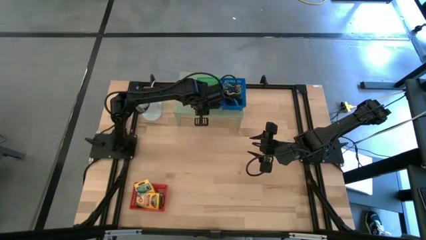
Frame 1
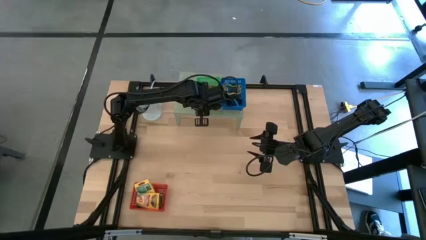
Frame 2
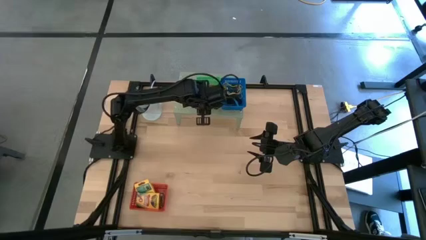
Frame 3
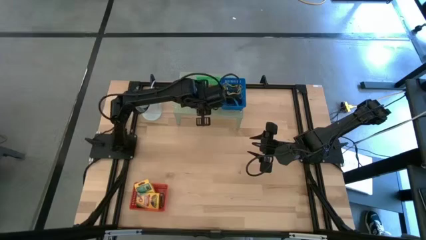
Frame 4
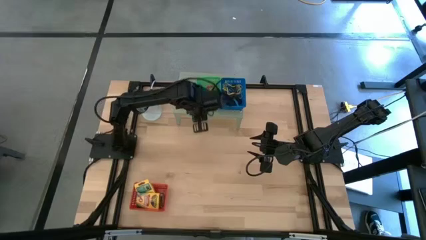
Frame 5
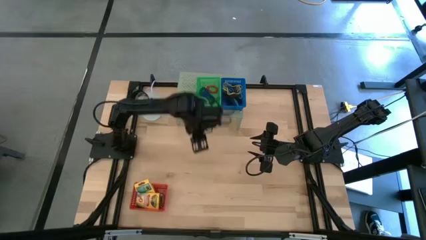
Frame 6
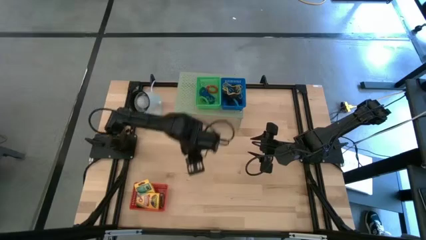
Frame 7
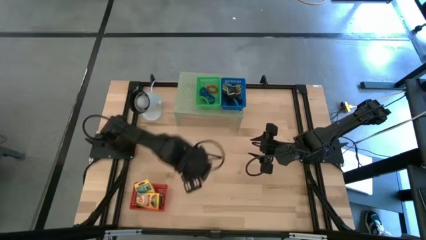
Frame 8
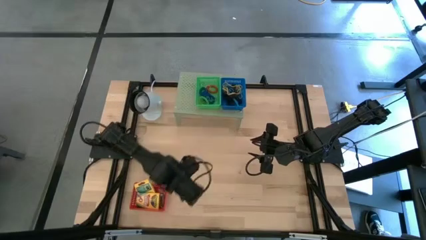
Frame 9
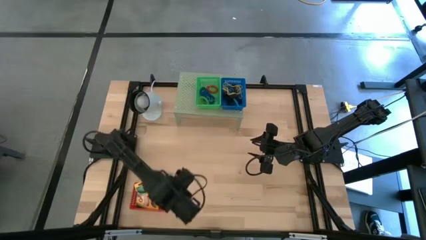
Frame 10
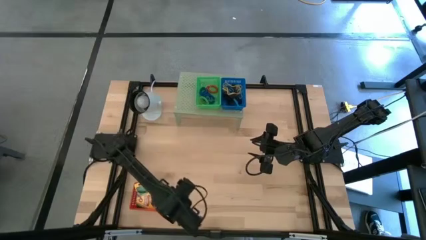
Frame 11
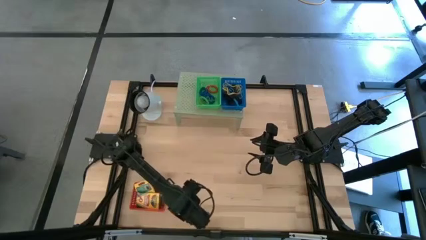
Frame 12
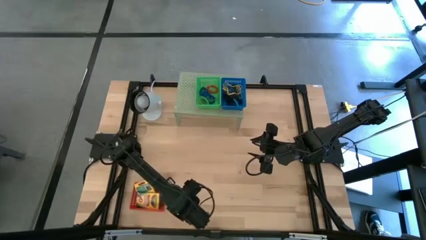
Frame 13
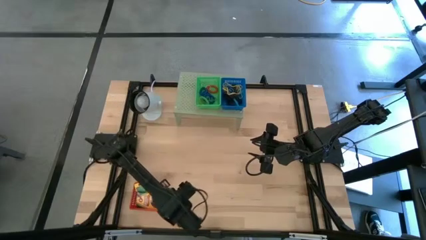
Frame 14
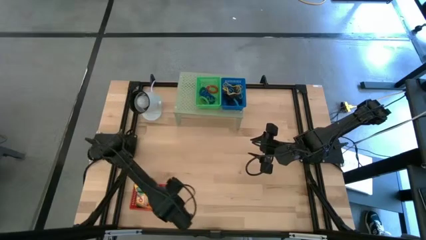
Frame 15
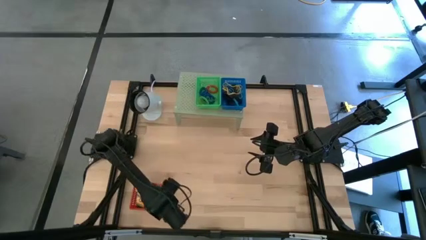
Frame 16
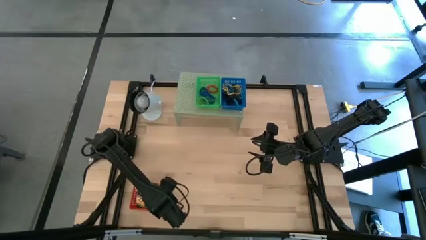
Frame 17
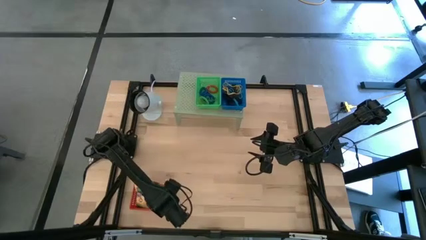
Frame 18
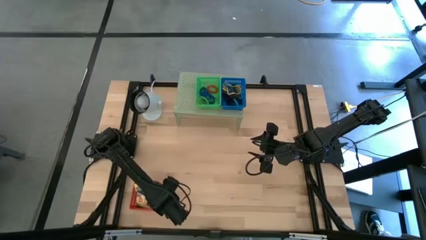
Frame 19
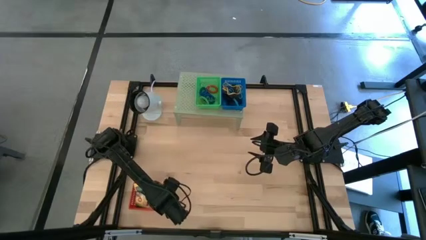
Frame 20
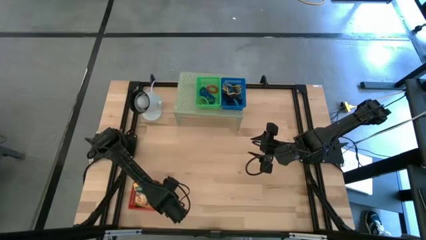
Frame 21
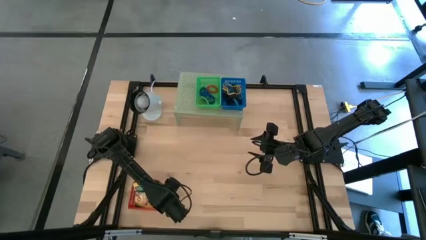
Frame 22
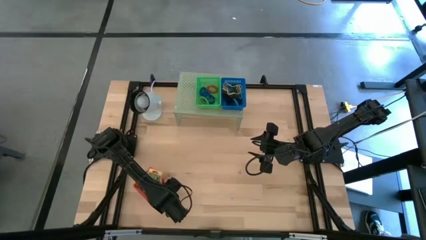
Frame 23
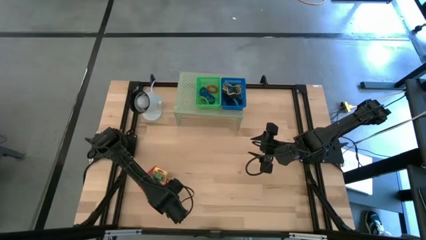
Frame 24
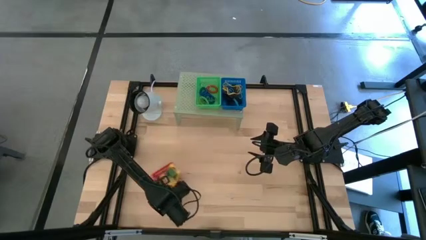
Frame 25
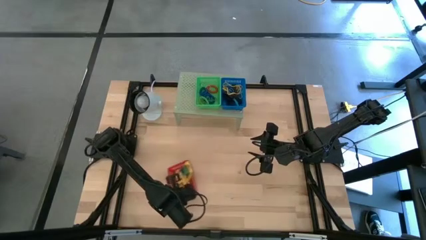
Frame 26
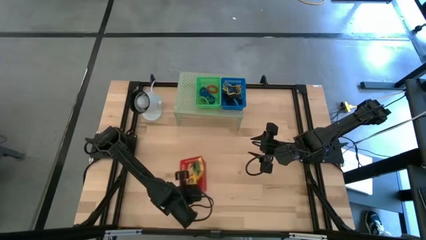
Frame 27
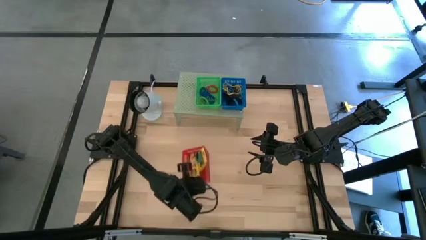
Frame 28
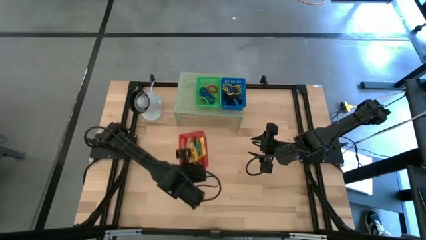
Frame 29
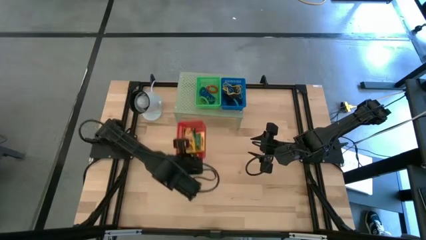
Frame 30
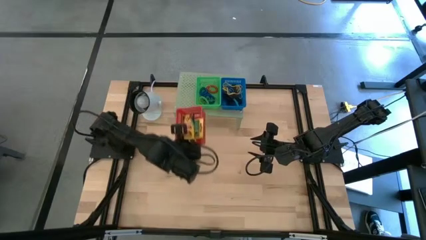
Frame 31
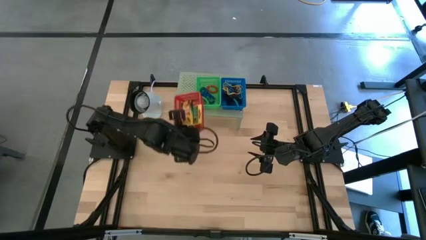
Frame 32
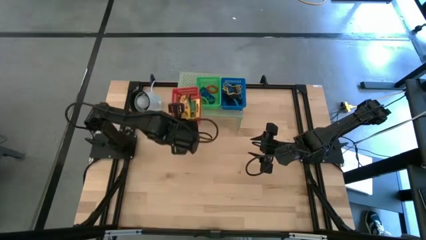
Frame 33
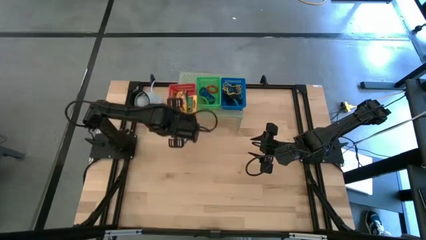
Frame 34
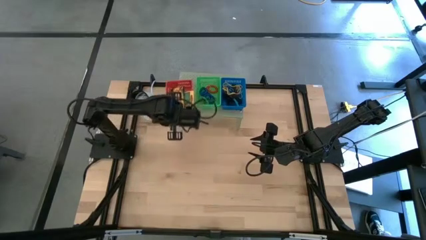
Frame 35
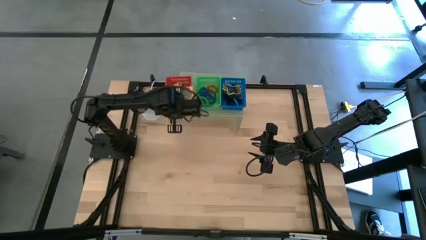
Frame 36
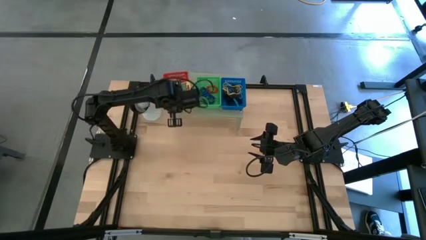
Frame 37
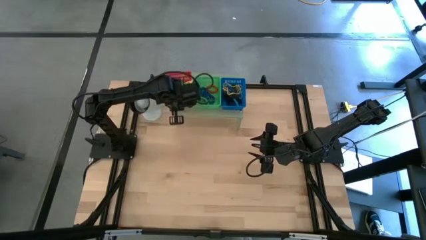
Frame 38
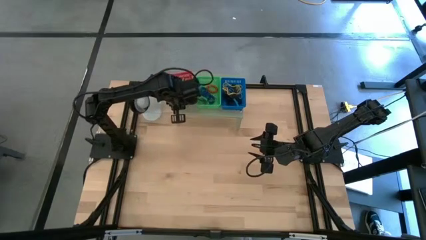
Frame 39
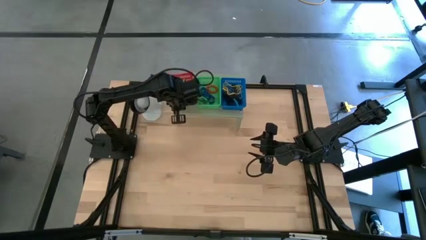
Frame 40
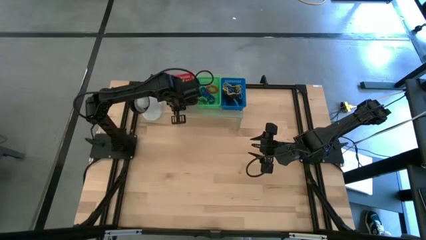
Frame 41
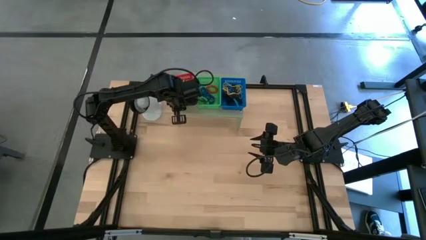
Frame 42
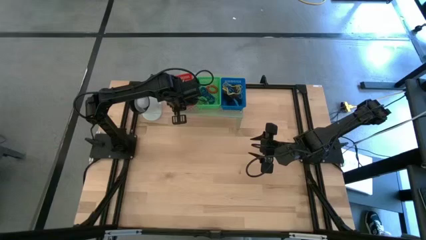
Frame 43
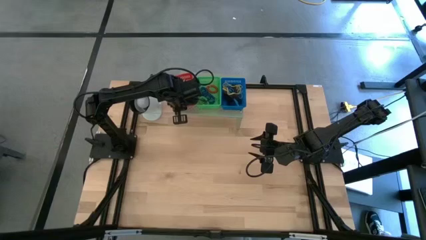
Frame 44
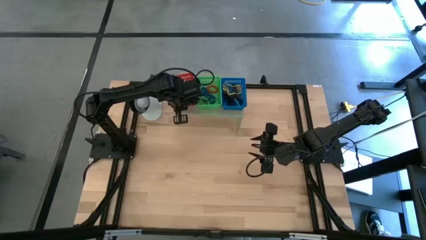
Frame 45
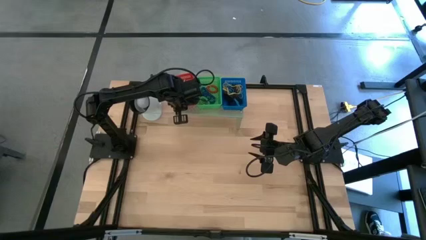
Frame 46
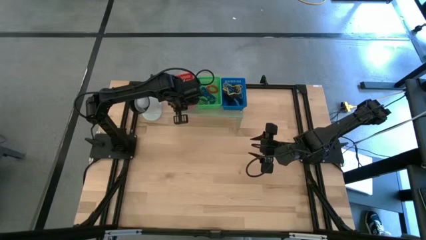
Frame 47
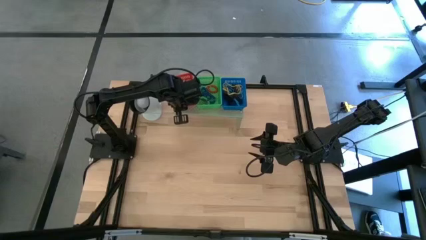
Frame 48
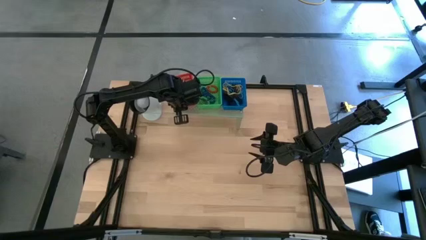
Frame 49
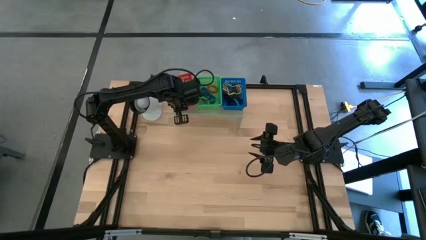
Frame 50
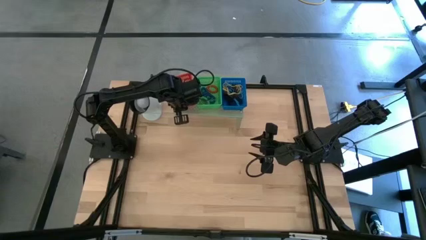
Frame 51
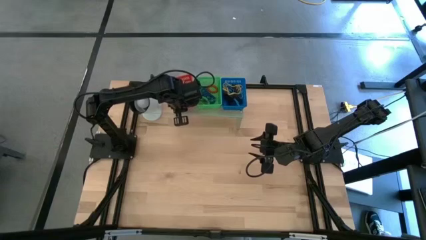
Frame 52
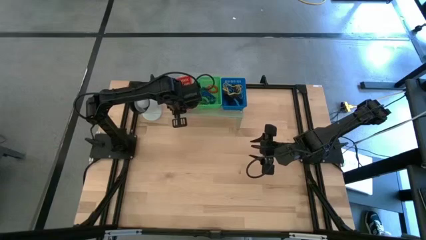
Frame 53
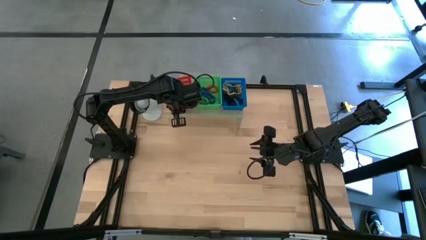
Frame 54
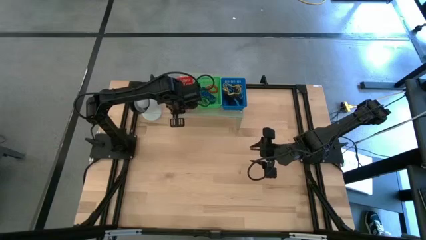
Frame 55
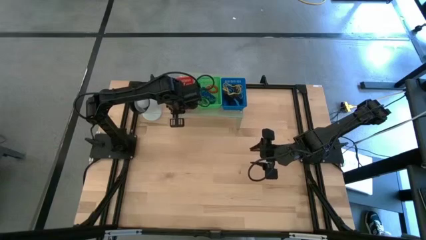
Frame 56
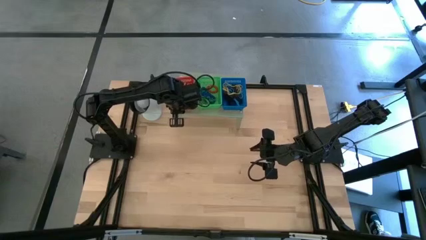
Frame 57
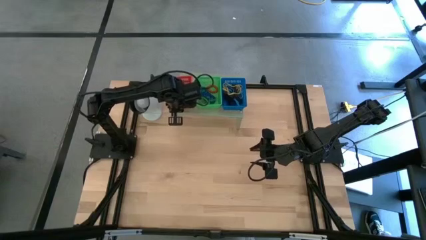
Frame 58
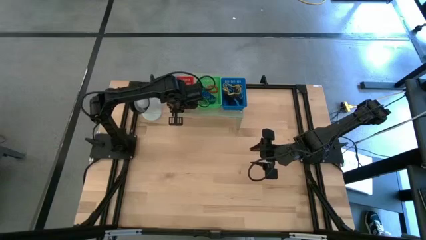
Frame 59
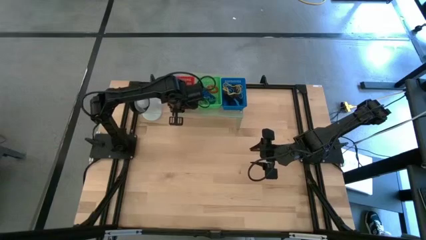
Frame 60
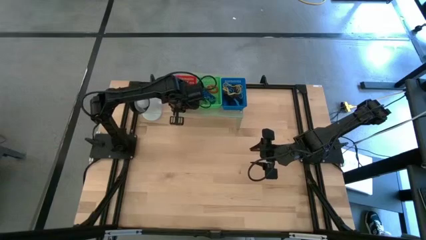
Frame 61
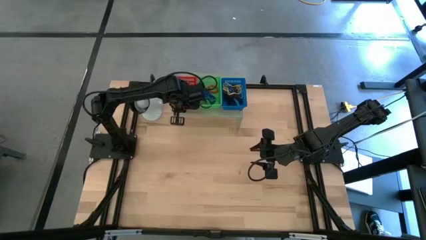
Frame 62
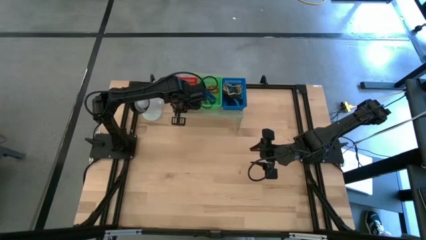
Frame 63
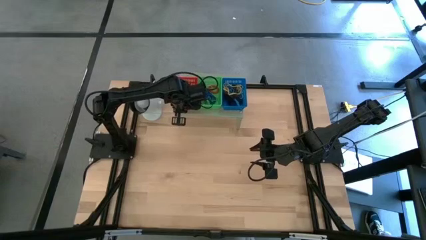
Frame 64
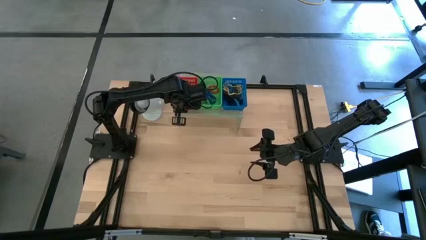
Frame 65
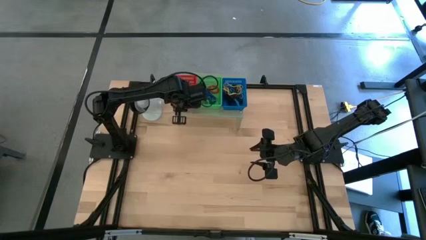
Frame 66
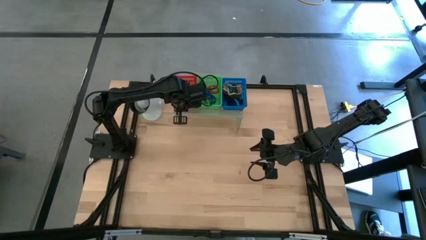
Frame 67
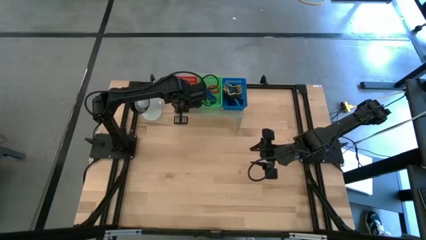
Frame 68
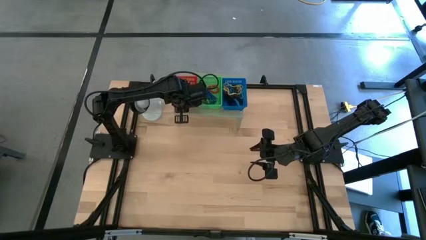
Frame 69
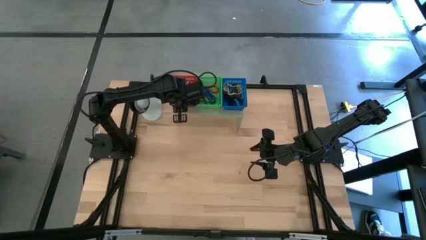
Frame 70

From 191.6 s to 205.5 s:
Task: Pick & Place Office Desk Supplies
Put the red bin on the shelf

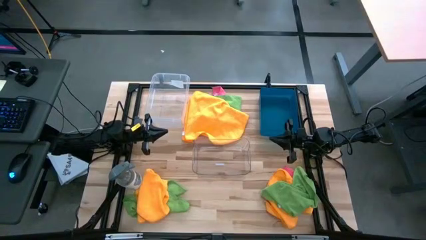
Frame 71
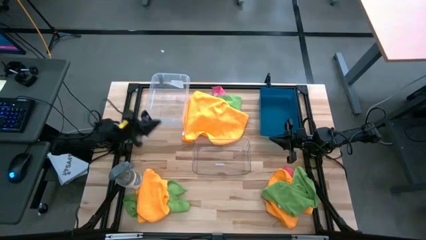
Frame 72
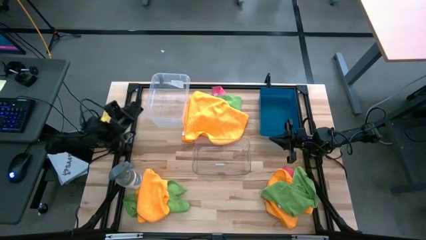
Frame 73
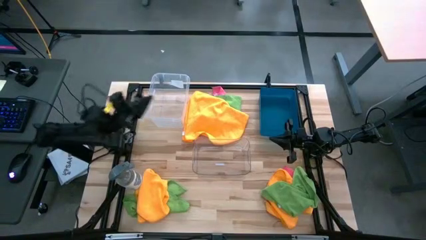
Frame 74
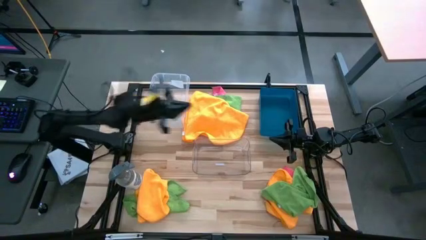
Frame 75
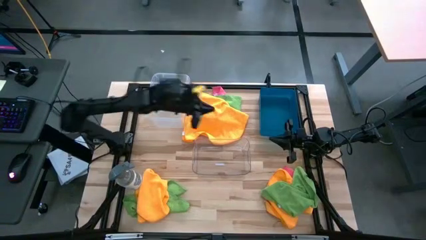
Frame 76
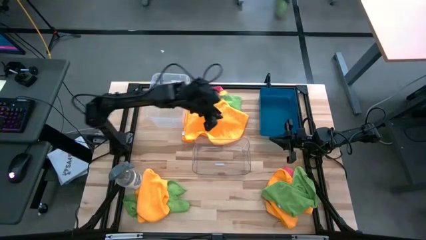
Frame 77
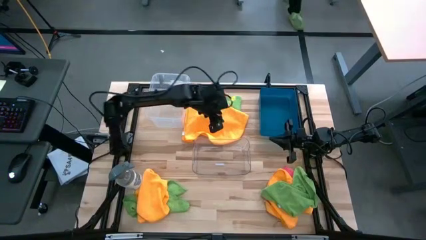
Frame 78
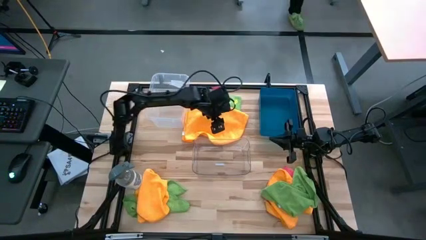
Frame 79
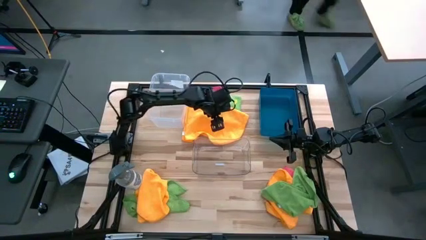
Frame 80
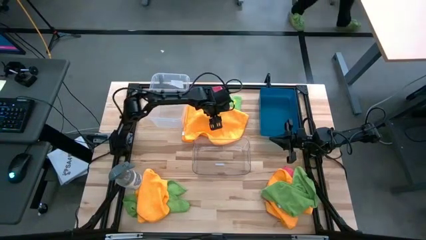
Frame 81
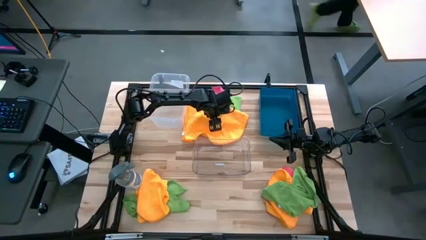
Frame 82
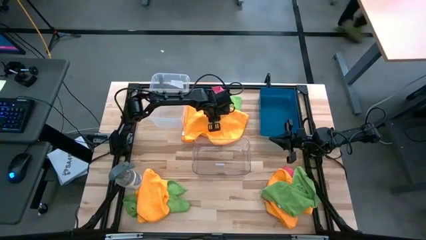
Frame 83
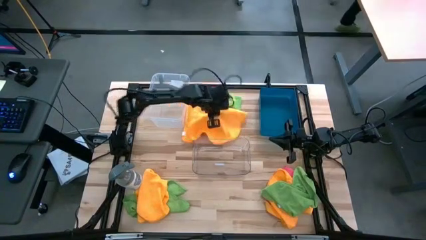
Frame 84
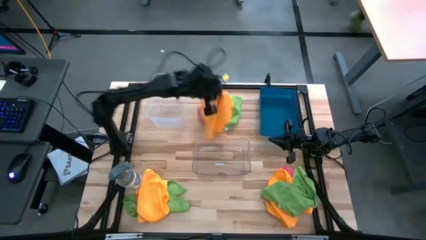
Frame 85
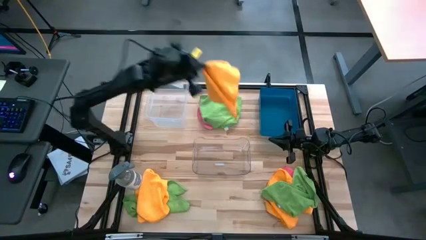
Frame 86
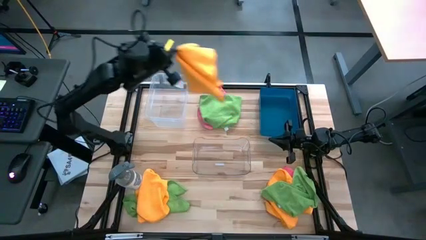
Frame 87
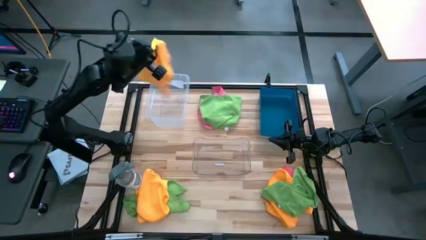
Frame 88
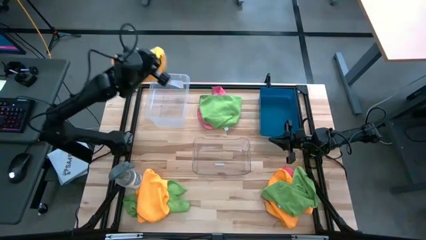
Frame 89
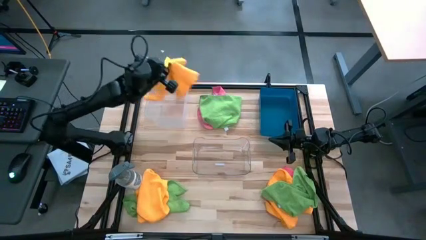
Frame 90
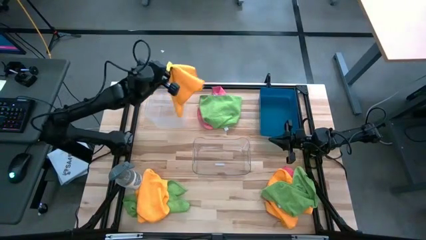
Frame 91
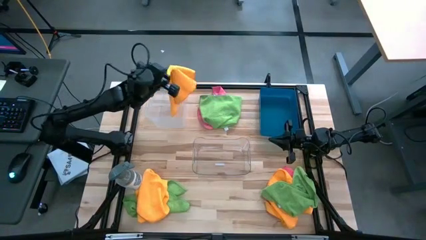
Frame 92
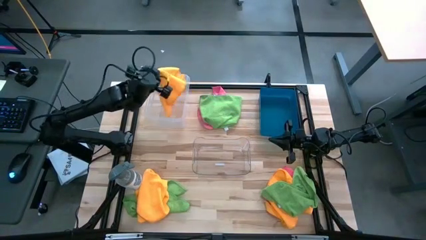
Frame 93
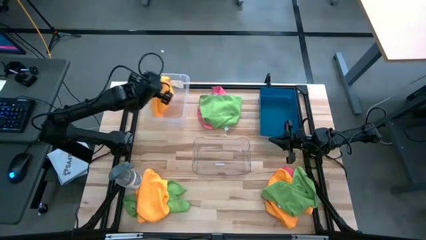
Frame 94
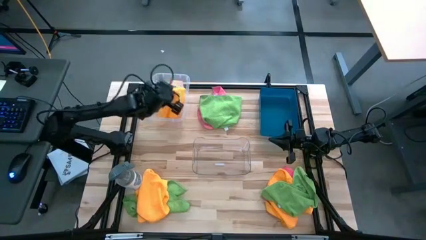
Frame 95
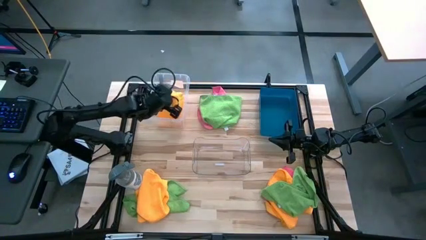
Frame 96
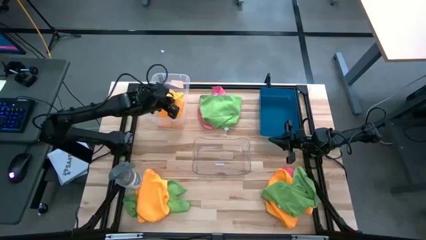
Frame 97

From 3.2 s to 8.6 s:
Task: Sort microfiber towel by color & place in baskets
Put the top center orange microfiber cloth into the transparent bin
